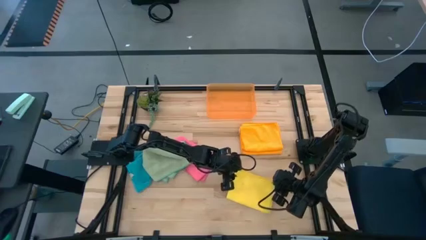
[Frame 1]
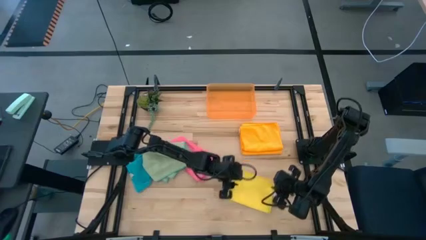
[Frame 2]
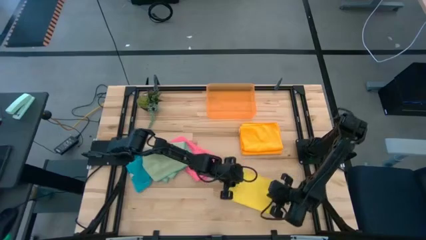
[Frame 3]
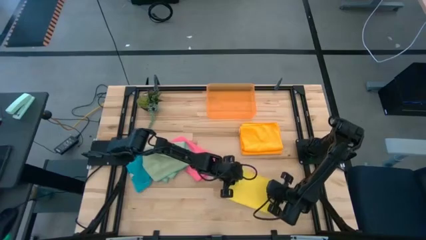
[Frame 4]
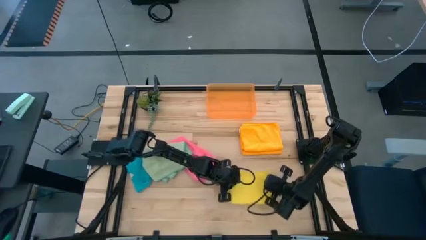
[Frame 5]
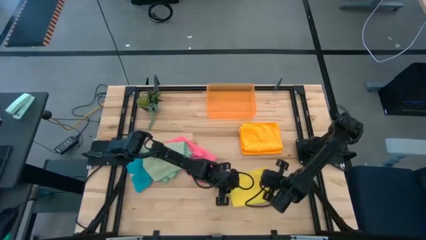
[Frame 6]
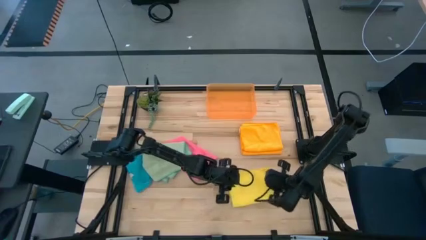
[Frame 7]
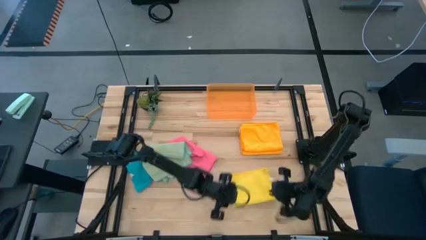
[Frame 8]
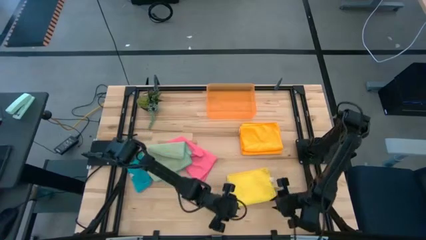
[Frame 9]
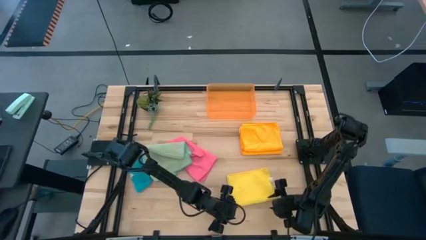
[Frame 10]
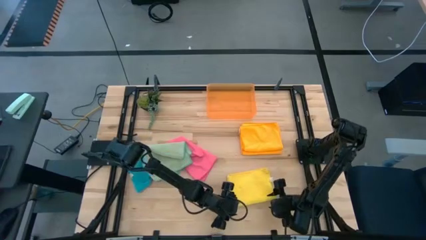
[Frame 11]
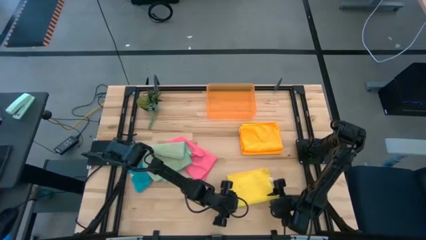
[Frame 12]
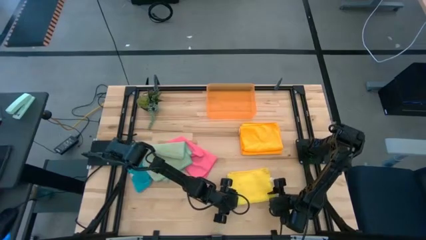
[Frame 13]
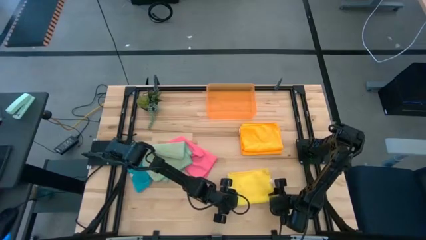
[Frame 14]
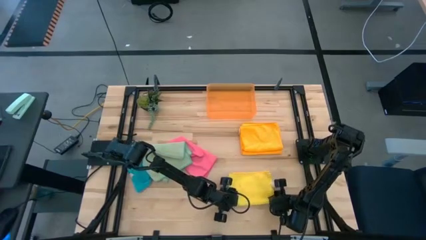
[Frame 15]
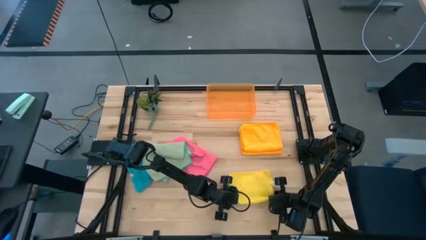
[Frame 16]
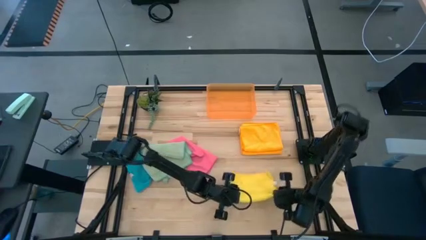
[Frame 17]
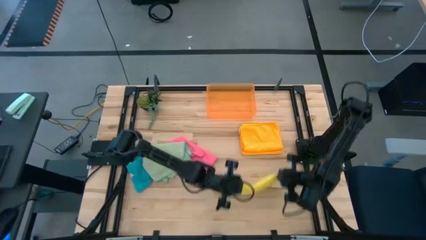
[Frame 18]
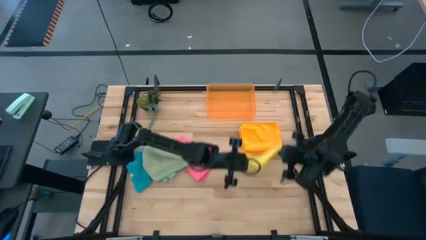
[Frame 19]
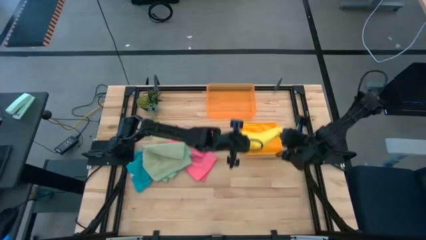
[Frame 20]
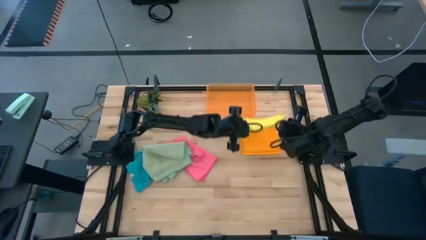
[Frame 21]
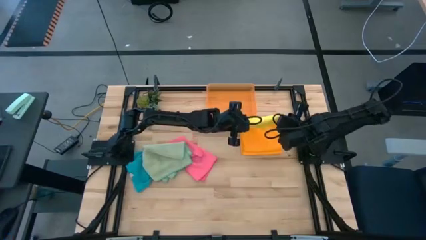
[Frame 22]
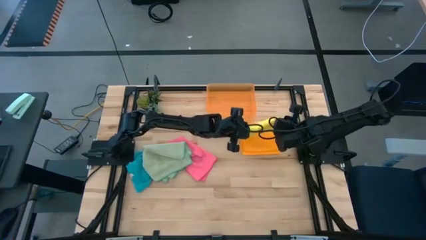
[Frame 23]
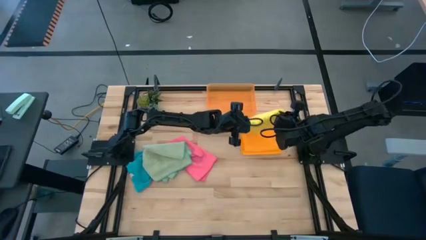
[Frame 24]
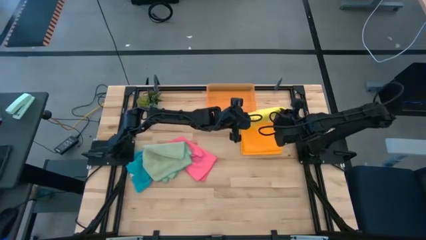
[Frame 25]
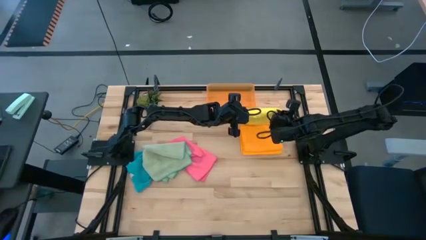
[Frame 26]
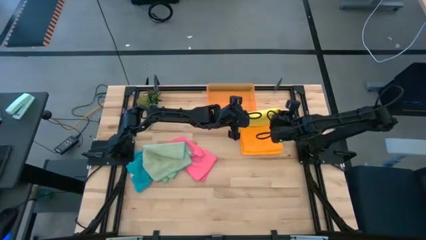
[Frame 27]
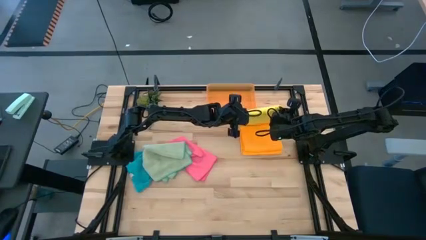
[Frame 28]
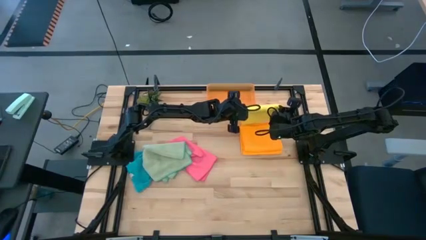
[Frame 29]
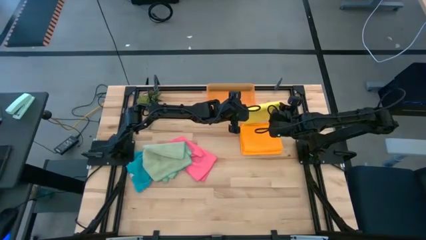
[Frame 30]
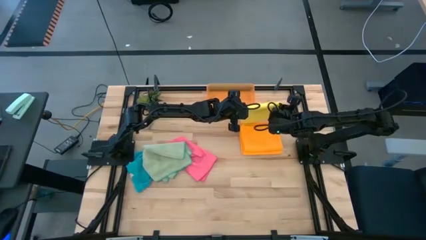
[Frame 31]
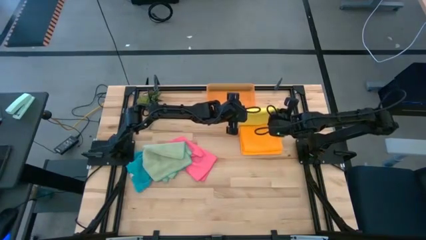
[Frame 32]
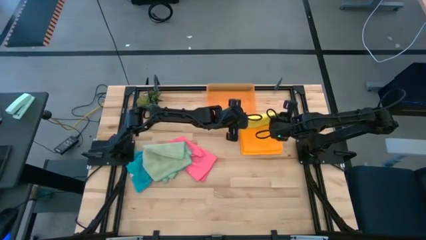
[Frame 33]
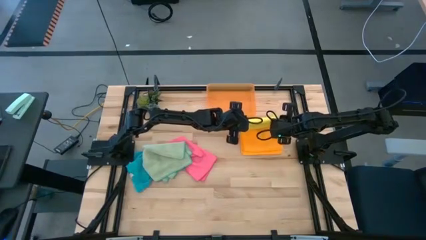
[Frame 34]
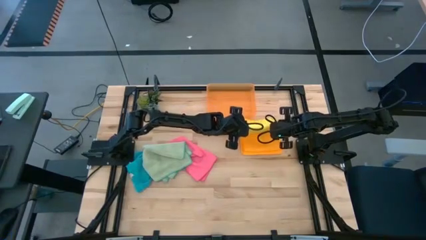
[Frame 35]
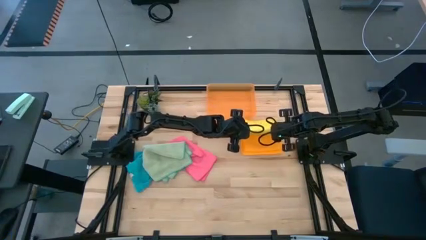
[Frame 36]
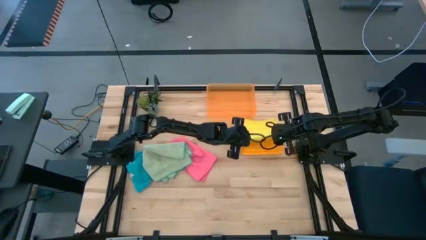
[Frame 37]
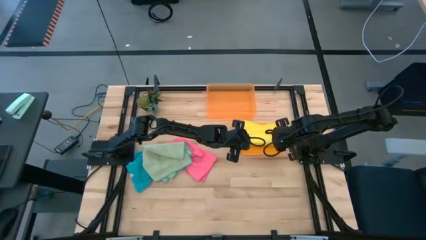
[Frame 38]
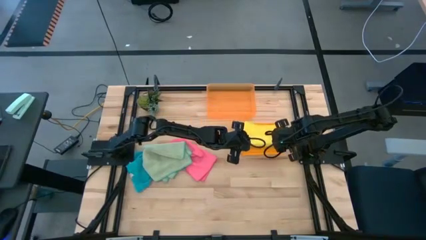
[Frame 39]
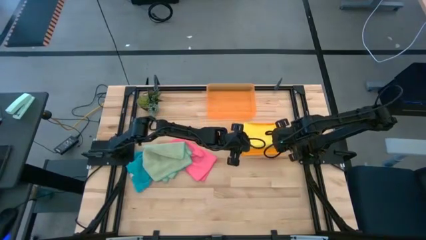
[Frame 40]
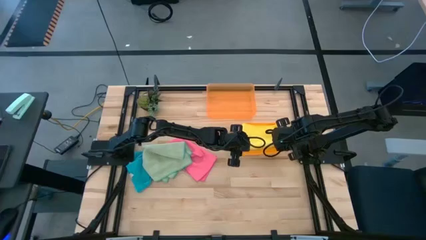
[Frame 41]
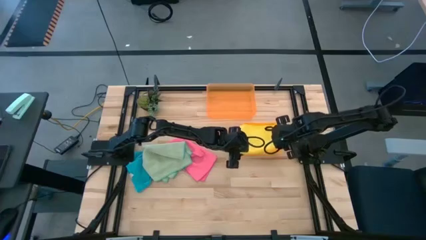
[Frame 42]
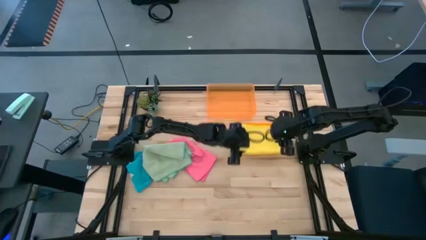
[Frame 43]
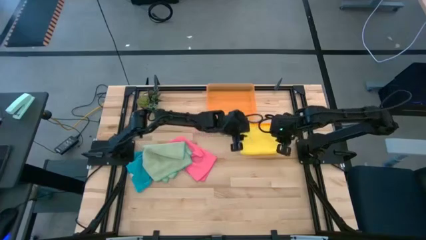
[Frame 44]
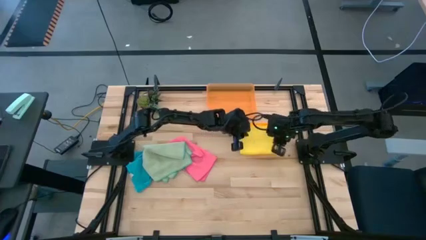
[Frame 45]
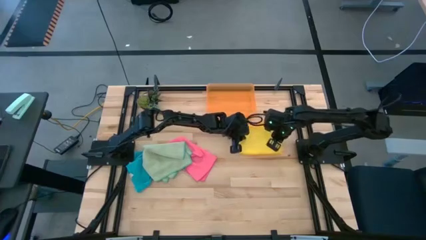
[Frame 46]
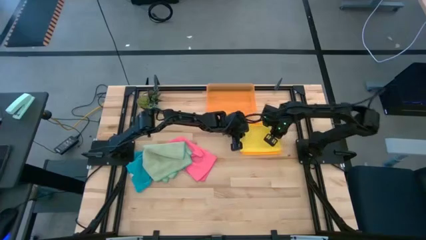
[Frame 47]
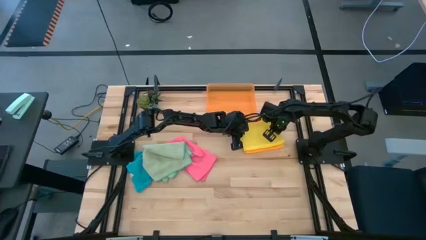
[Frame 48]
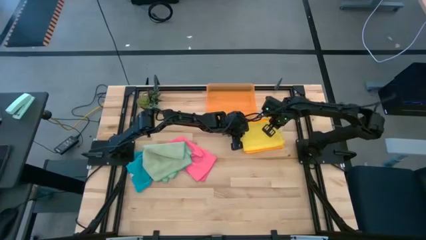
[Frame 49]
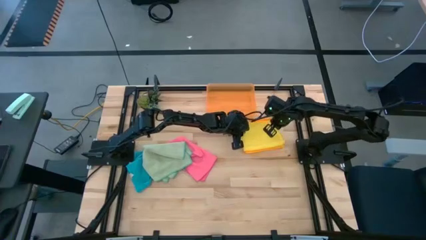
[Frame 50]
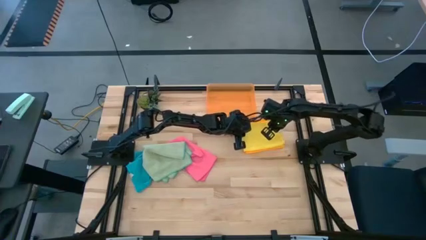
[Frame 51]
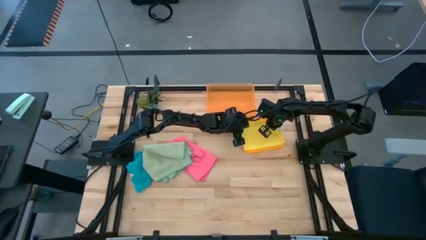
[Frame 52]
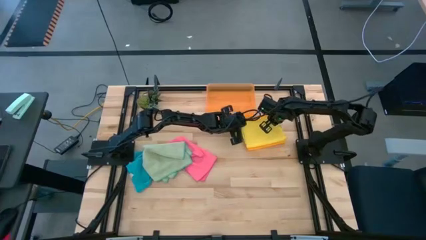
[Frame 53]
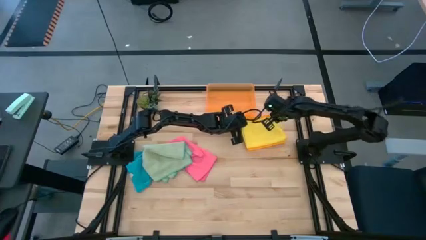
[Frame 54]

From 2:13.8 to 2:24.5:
Task: Fold microfiber towels
Stack the yellow microfiber cloth on top of the orange microfiber cloth

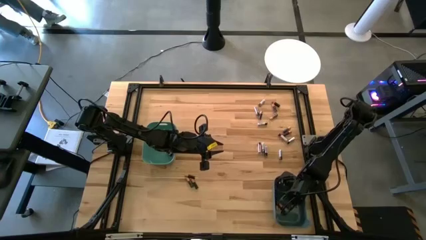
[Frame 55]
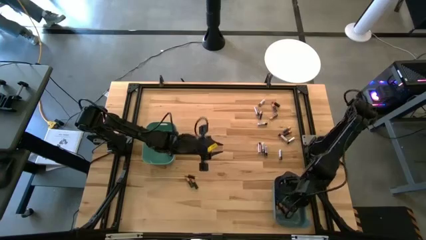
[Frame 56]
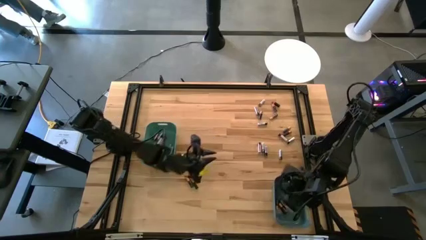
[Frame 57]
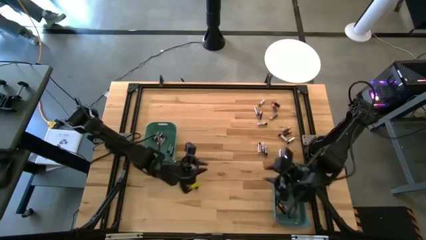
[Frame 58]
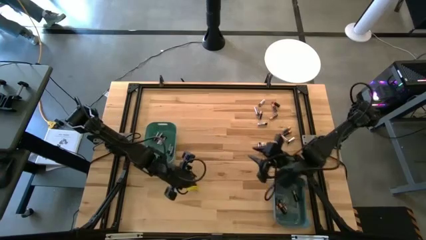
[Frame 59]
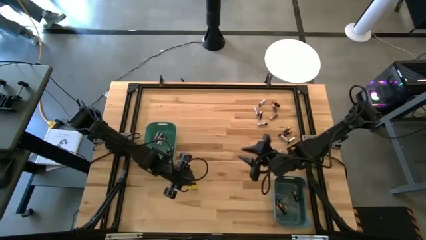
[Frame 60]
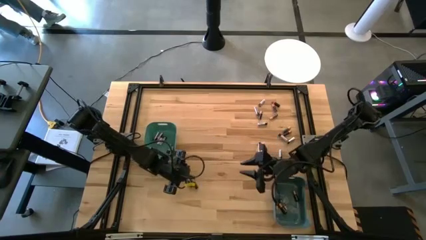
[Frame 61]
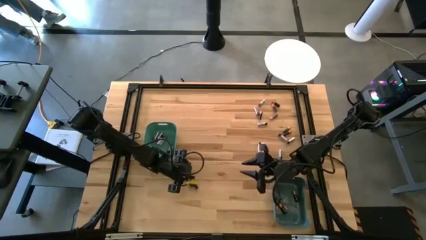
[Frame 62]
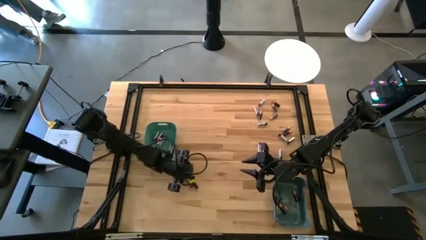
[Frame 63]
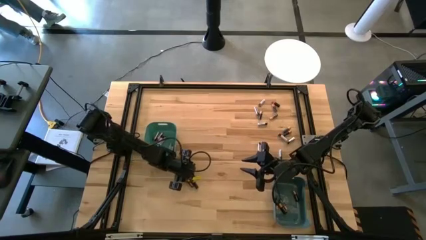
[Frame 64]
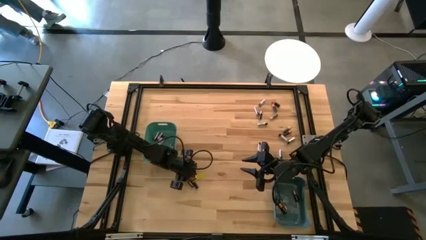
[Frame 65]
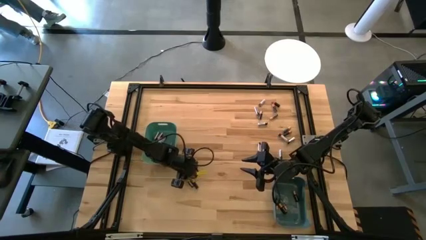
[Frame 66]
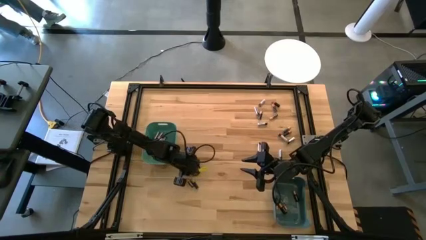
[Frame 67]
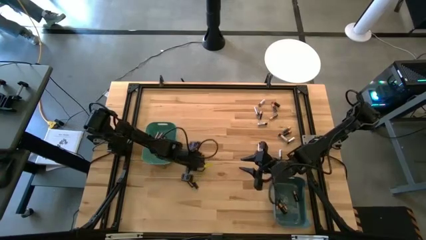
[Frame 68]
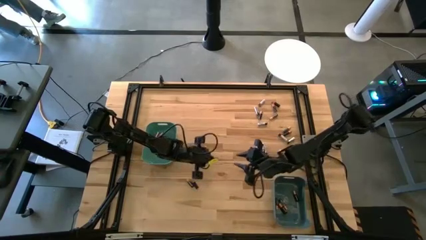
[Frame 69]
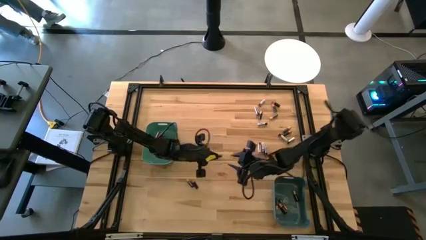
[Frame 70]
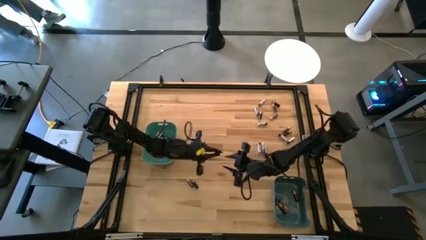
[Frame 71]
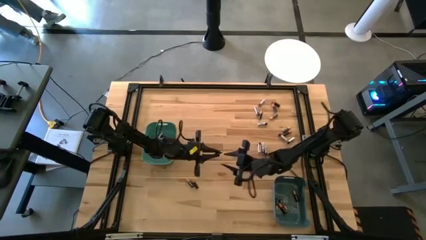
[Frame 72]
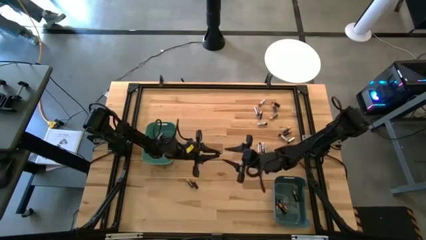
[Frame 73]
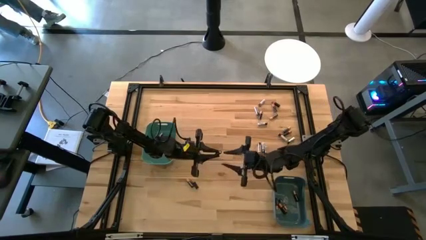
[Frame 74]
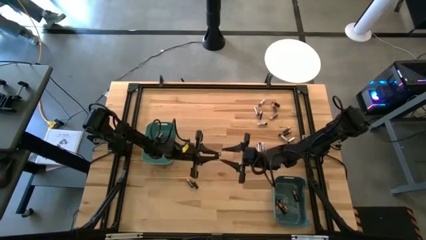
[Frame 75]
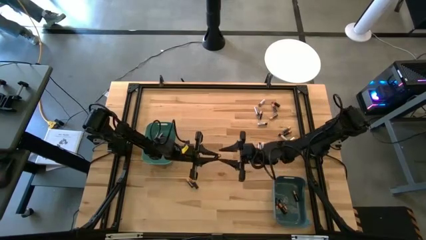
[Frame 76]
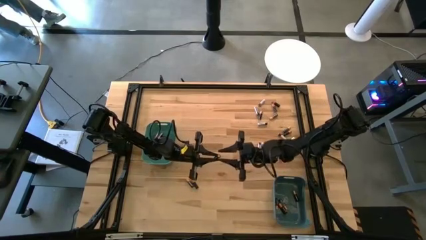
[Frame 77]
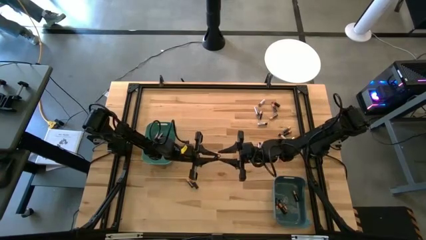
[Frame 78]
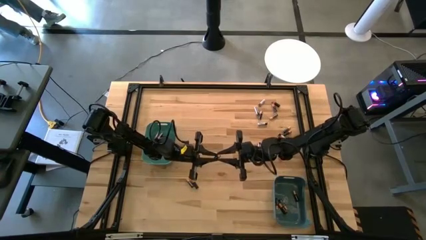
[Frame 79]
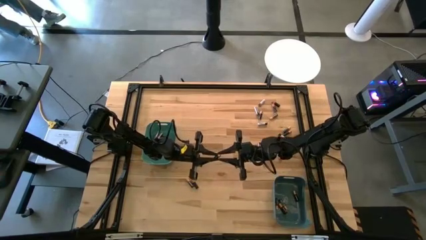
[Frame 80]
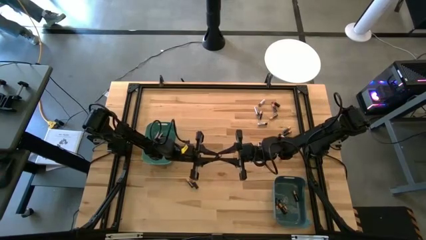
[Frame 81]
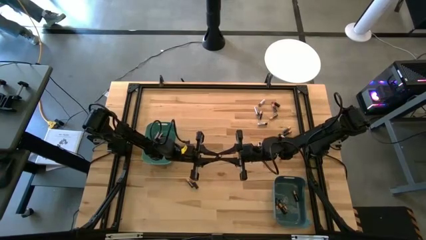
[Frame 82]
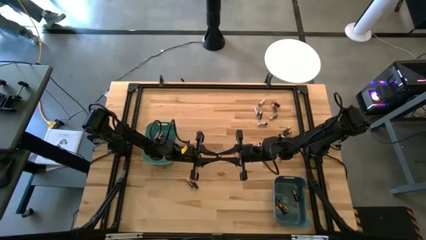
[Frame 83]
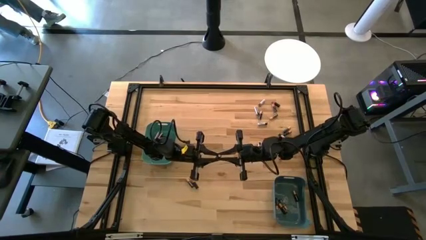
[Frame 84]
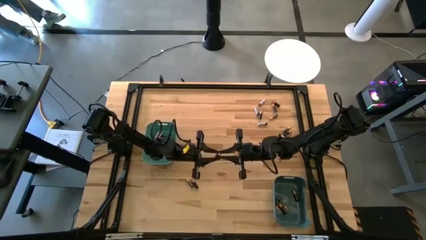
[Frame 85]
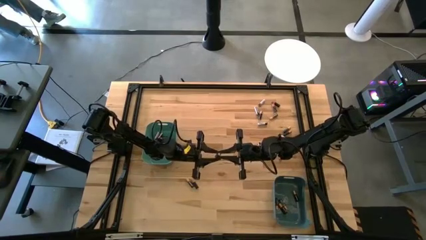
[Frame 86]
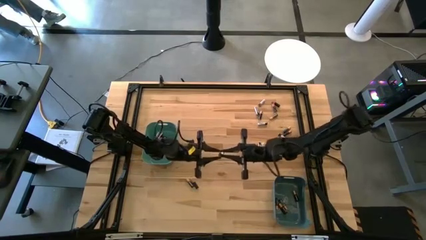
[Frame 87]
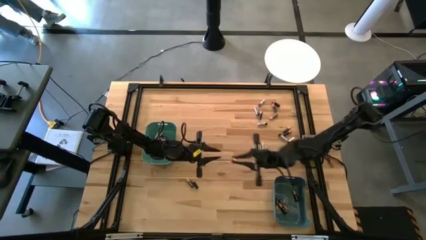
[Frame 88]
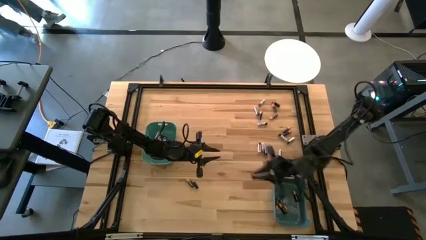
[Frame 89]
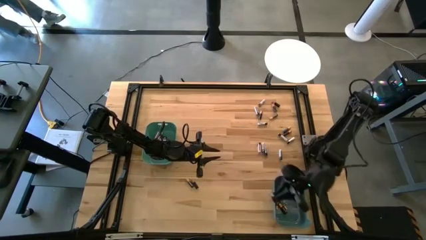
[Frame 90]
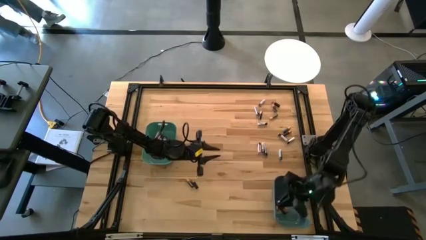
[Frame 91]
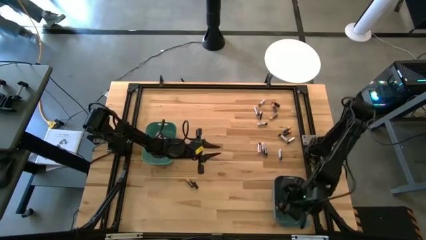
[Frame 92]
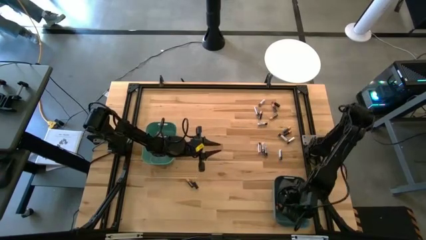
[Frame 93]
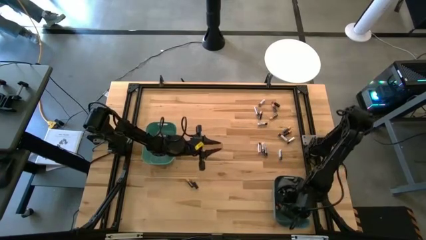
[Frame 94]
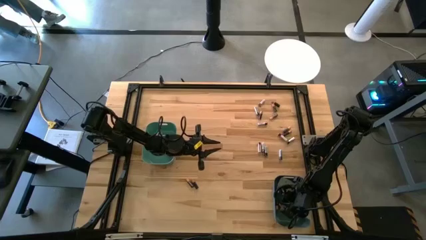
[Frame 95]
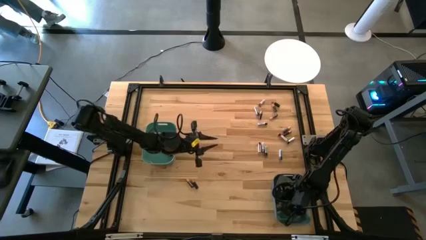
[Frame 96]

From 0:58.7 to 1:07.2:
Task: Sort batteries
Put the black battery into the blue bin
